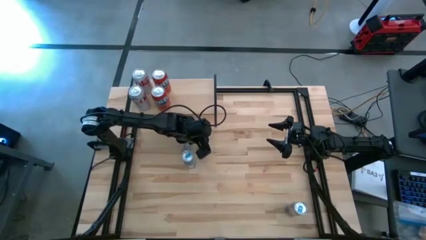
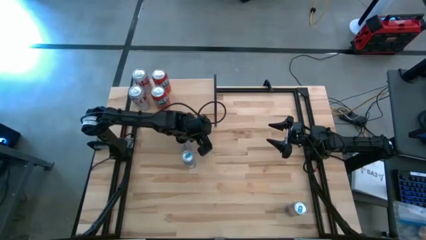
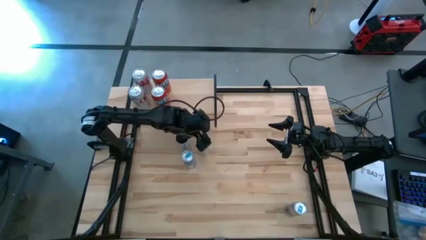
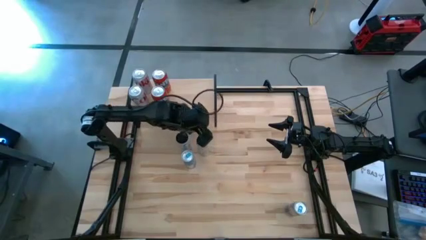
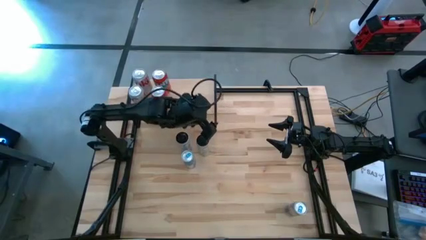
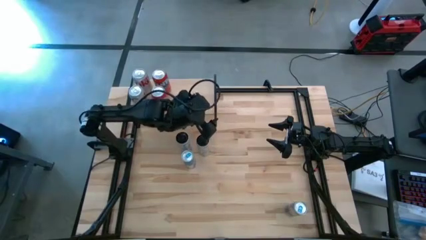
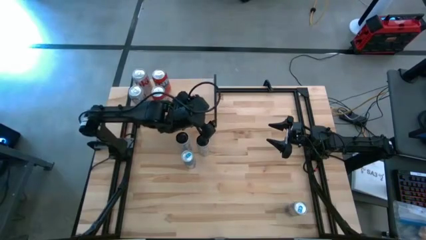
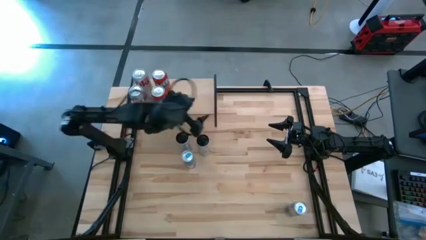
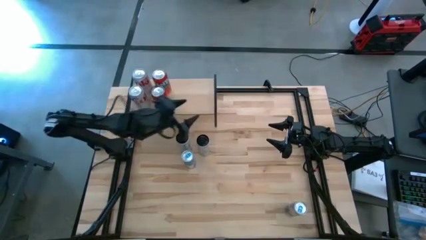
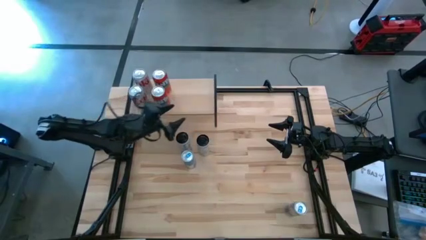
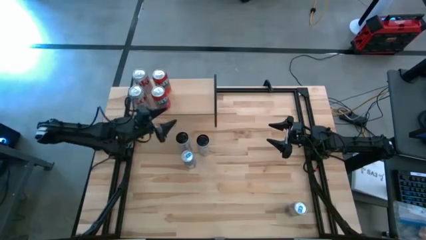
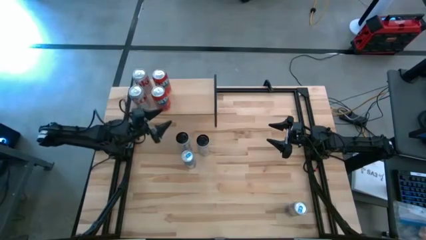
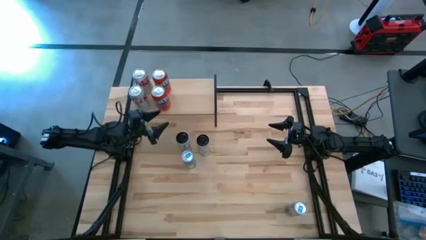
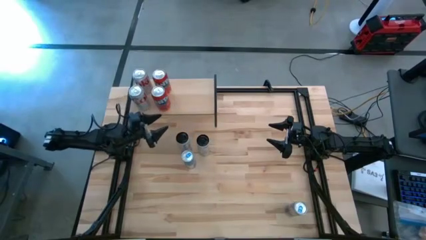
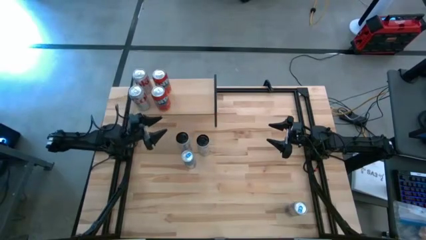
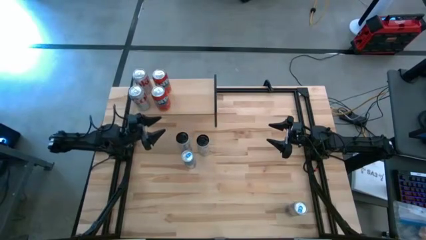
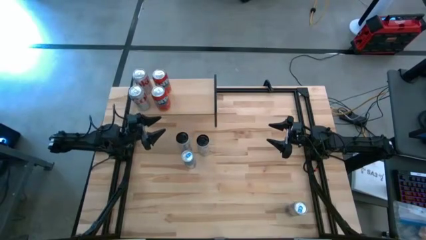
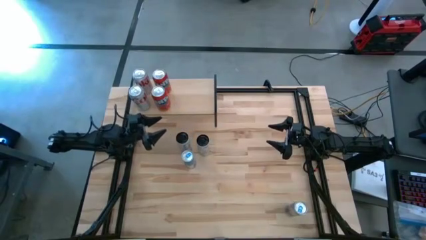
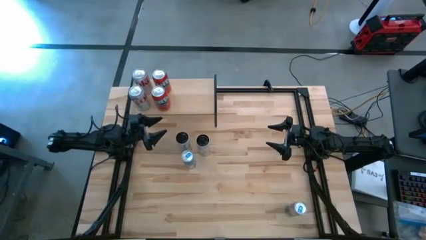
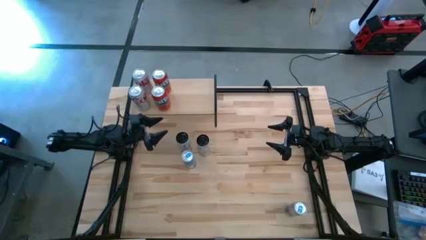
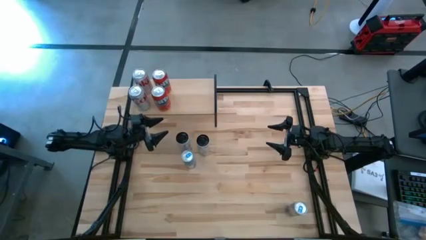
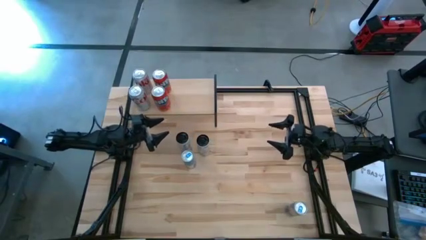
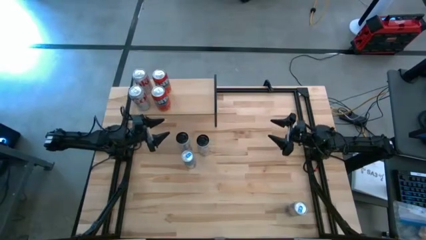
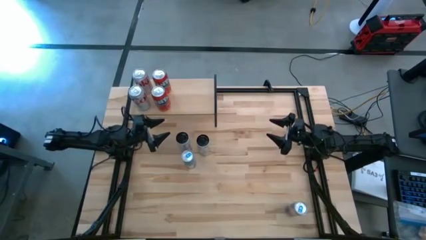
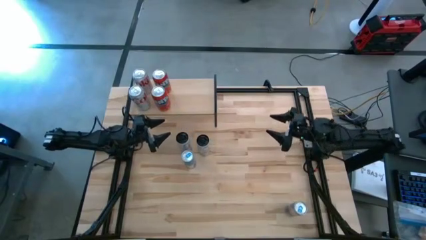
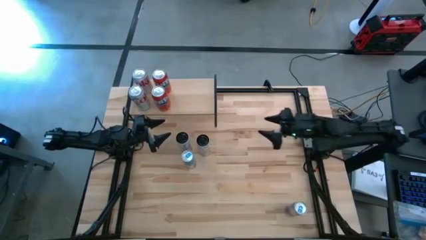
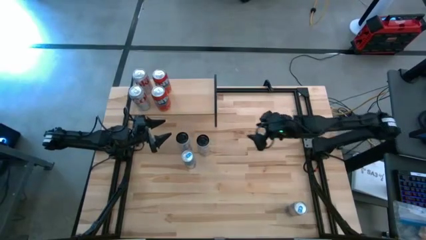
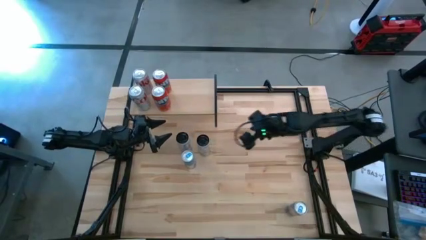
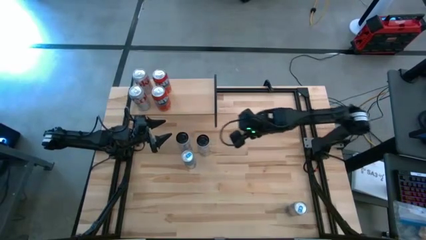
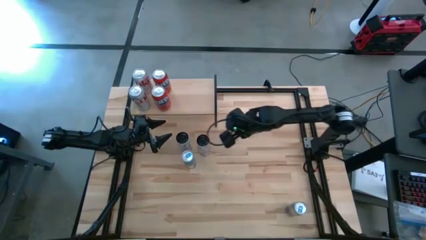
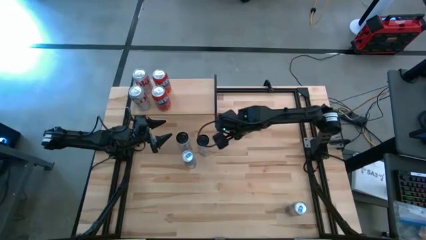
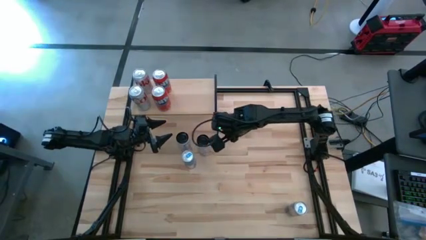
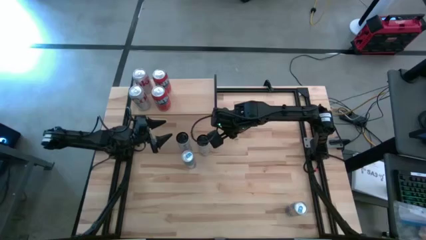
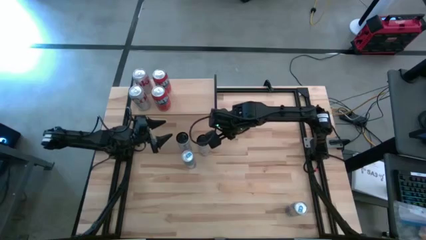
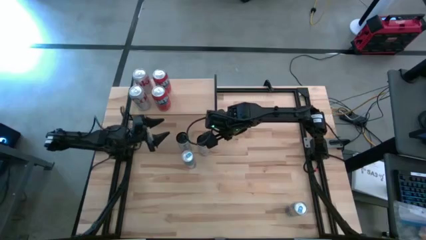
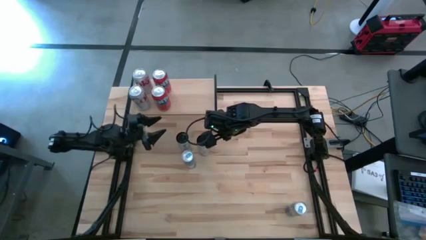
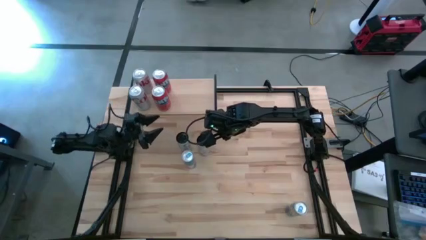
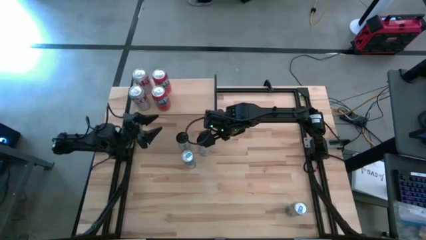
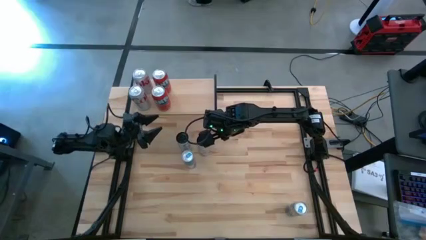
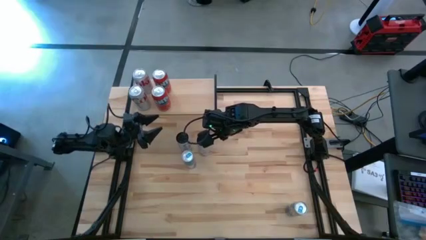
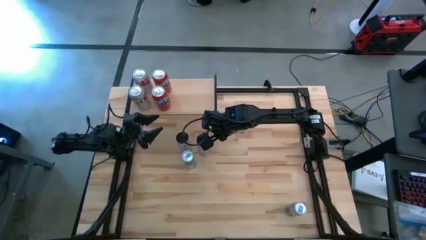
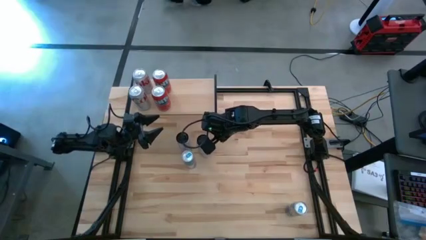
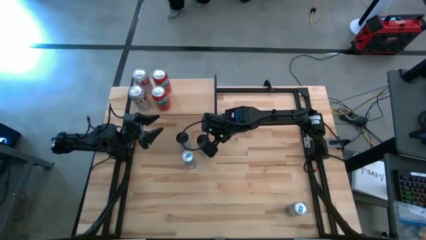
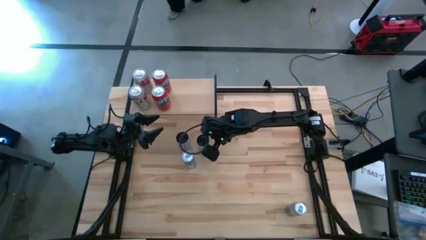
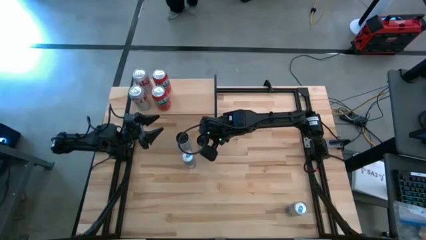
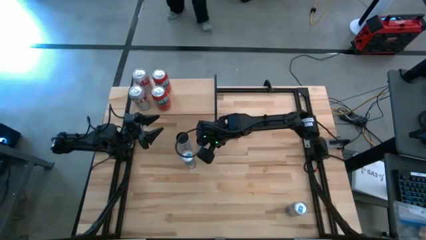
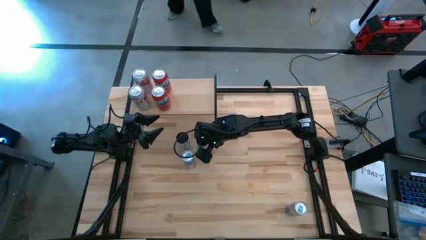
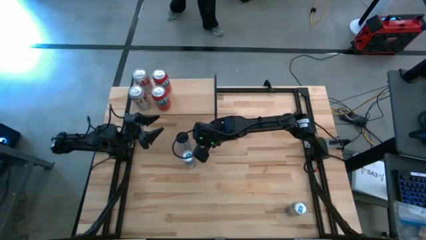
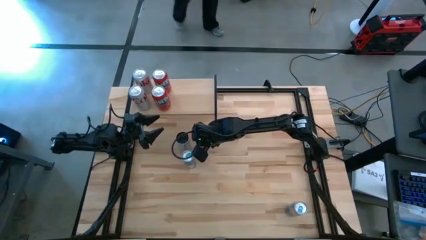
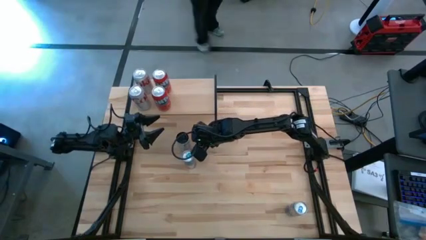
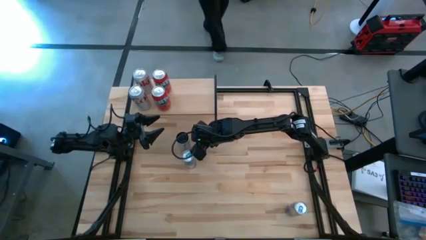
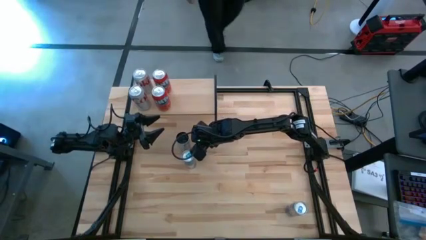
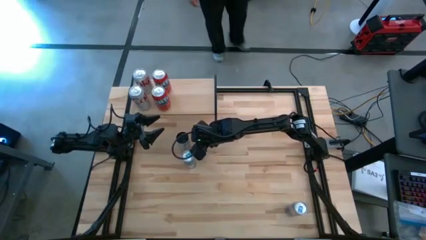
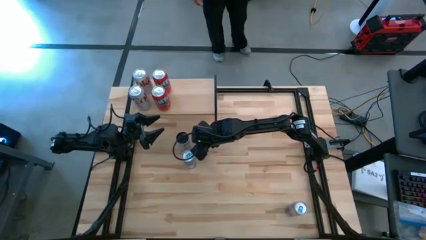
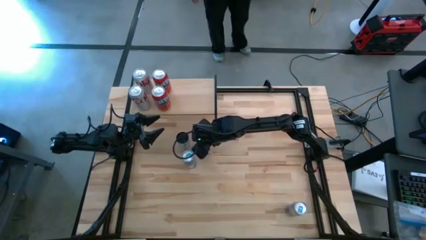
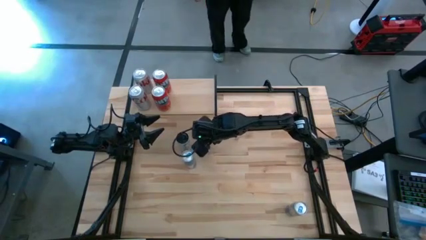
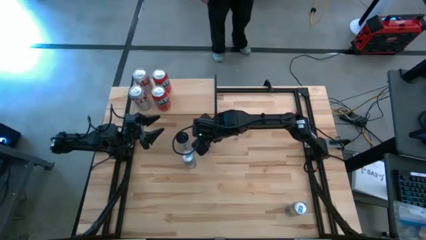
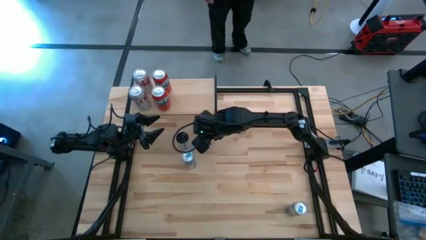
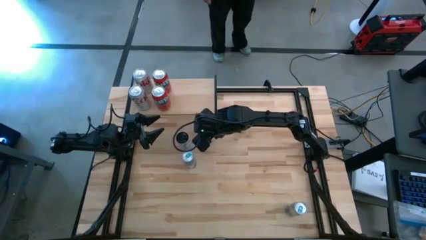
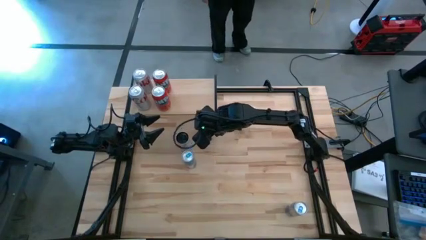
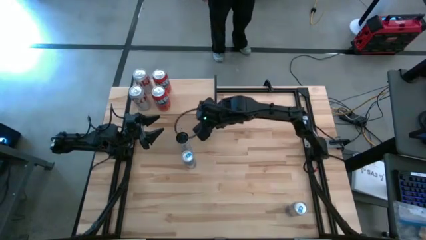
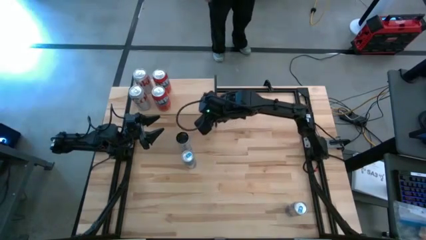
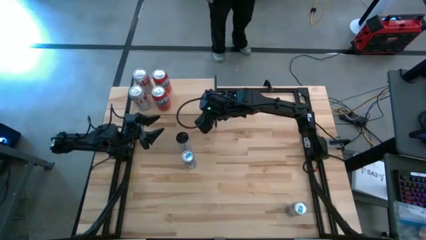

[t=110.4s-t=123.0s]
Task: Place canned beverage on shelf
Put the right white pink soda can on the shelf

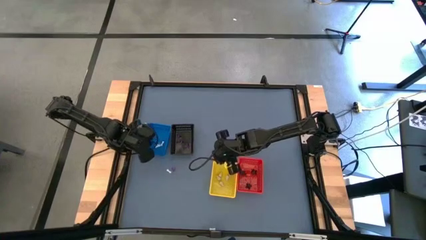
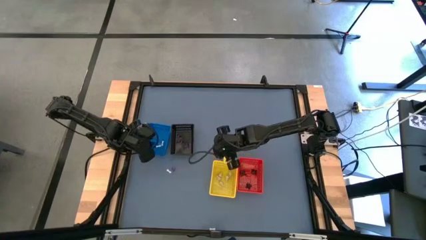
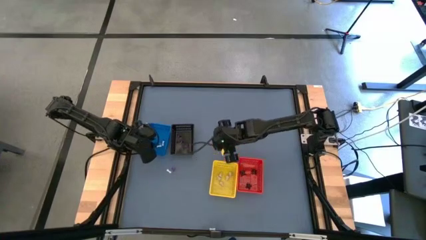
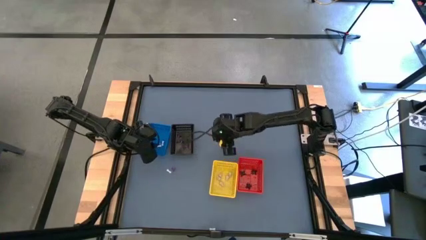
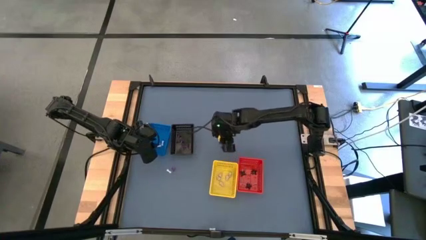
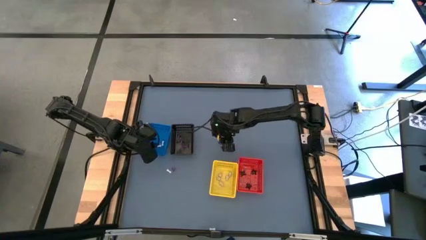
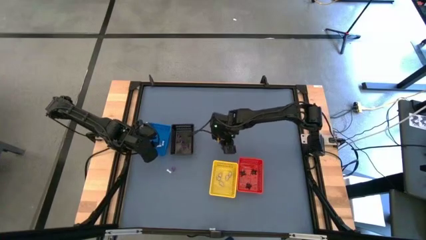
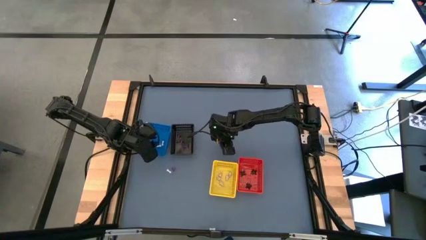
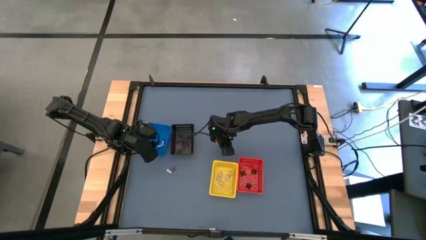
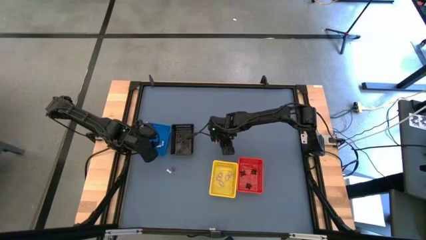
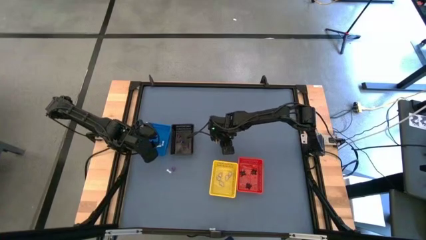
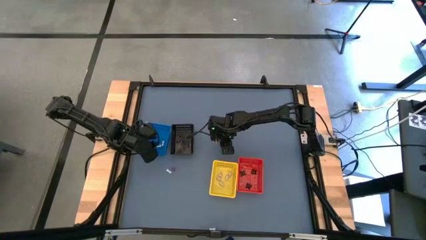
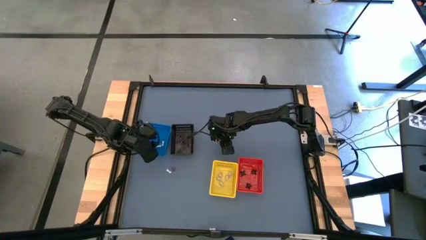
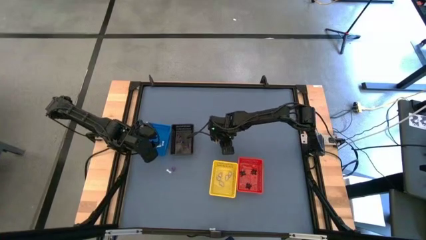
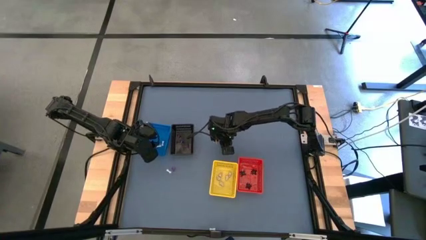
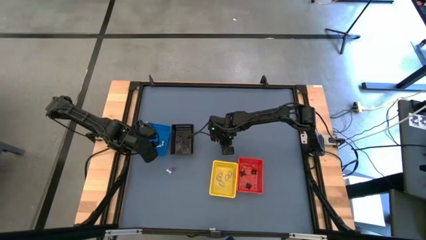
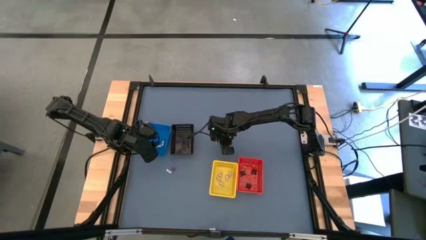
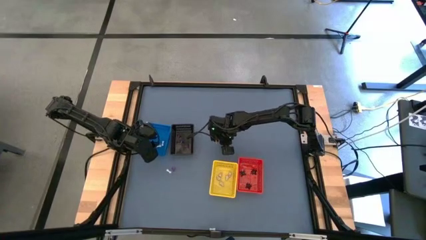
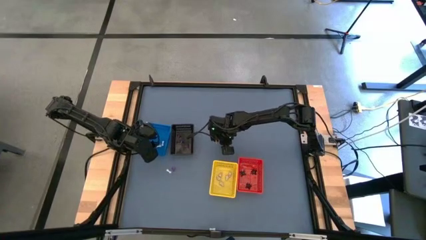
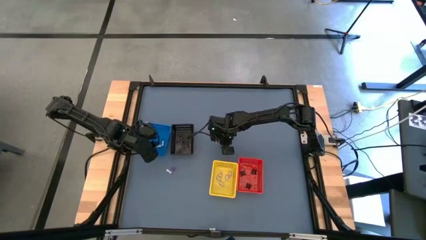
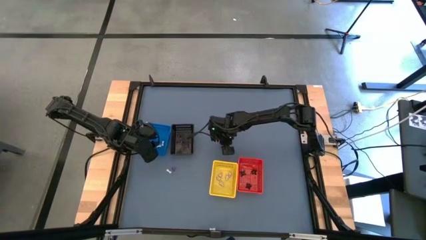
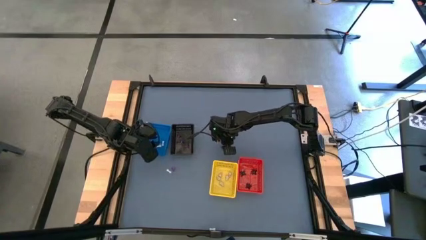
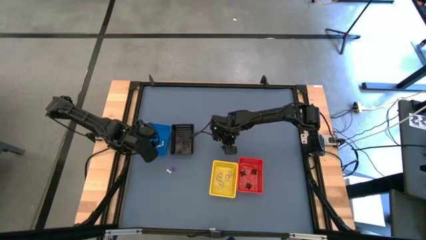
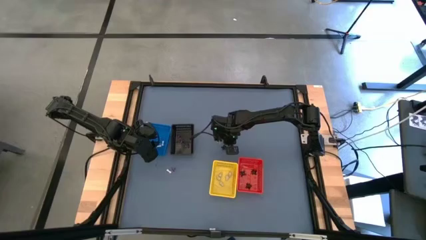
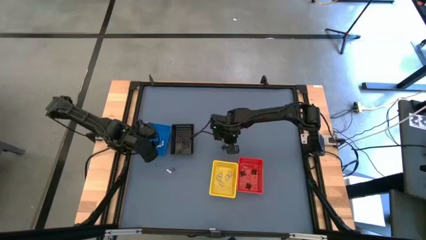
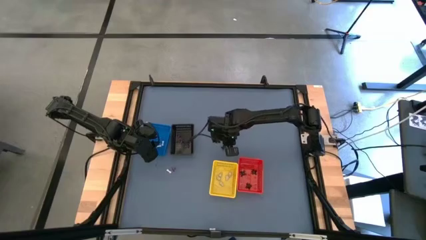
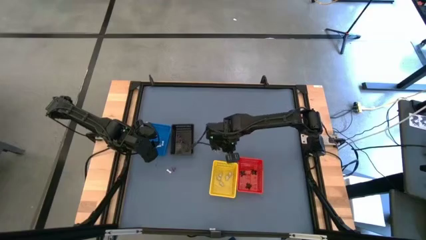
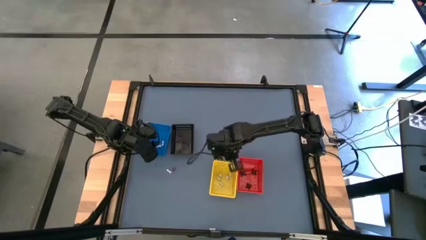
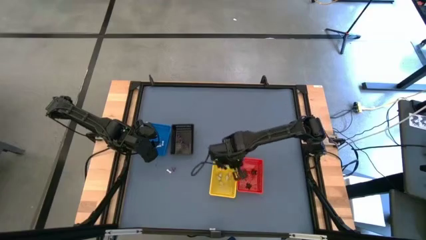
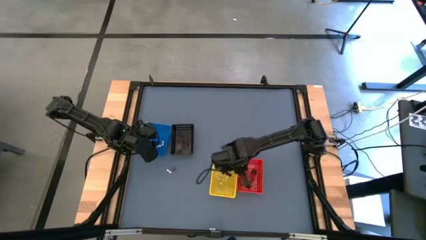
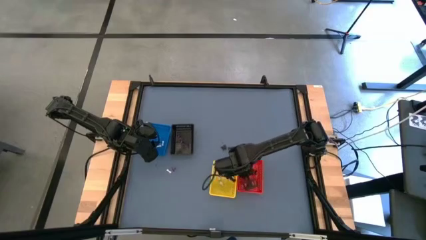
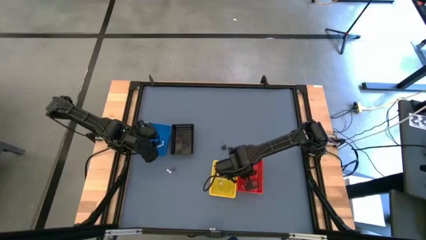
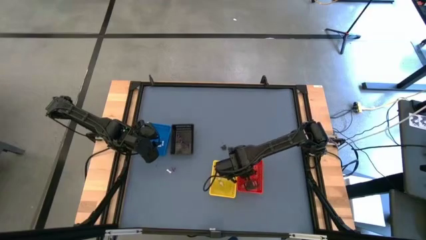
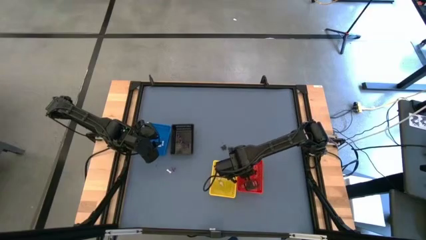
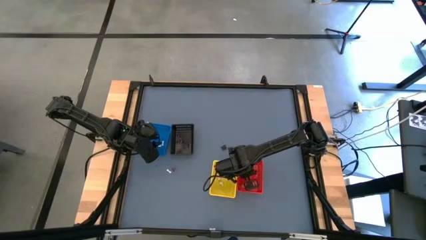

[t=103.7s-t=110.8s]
Task: Sort Halloween decoration
Put the spider toy into the red bin
